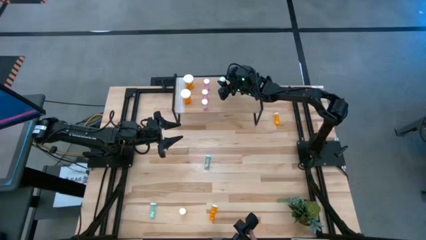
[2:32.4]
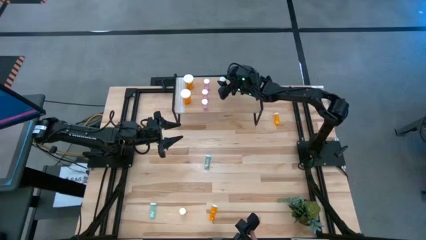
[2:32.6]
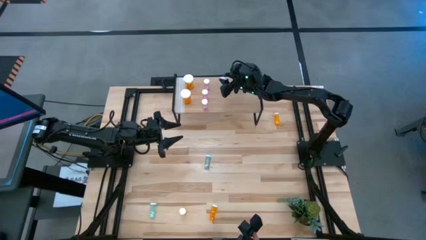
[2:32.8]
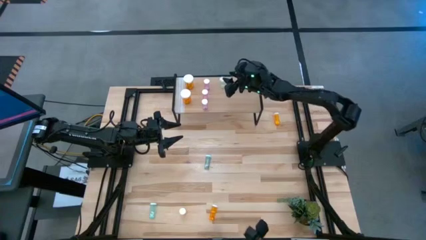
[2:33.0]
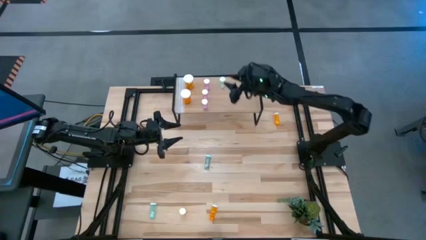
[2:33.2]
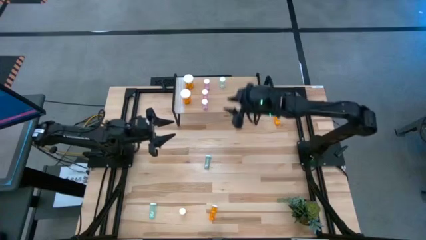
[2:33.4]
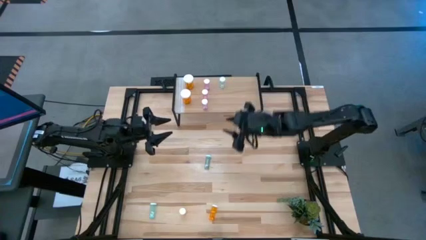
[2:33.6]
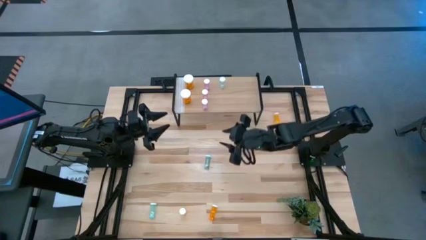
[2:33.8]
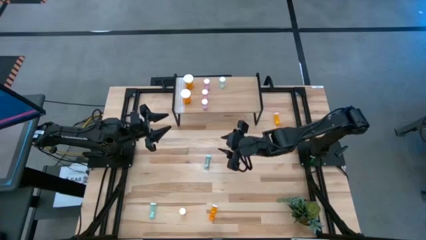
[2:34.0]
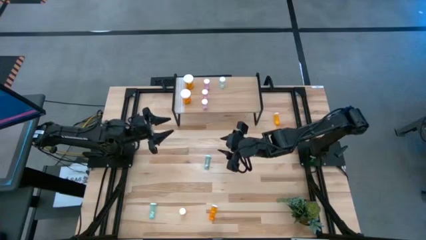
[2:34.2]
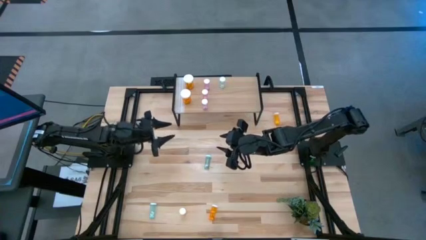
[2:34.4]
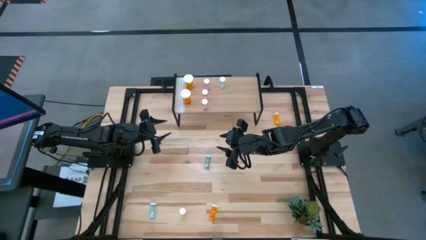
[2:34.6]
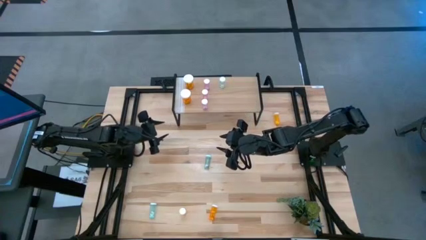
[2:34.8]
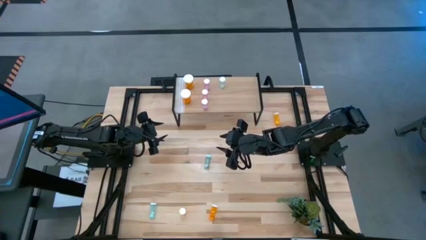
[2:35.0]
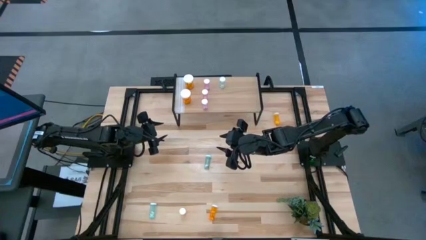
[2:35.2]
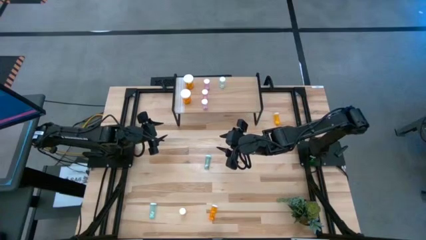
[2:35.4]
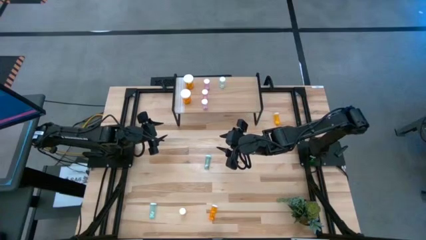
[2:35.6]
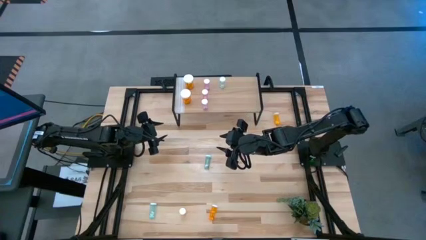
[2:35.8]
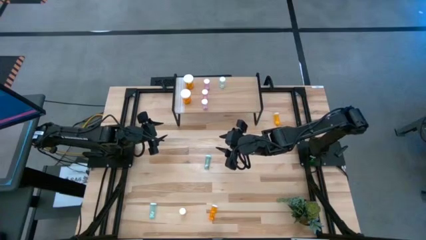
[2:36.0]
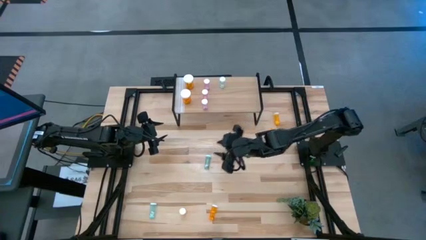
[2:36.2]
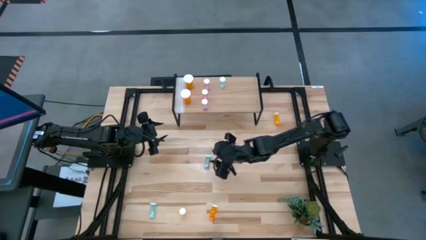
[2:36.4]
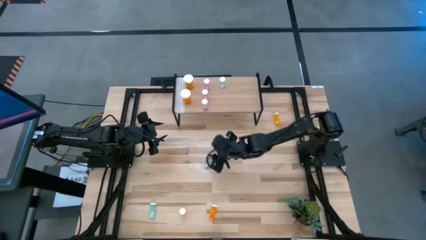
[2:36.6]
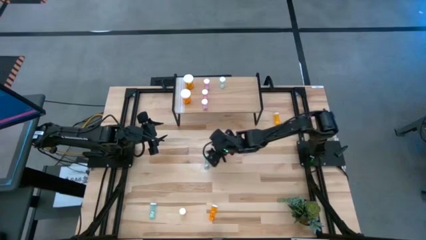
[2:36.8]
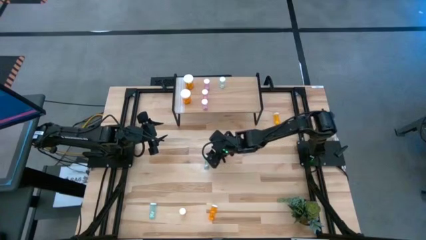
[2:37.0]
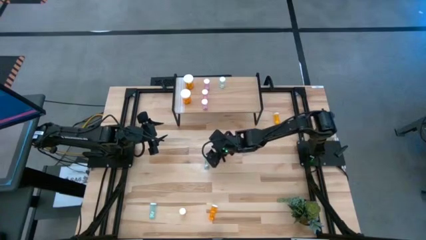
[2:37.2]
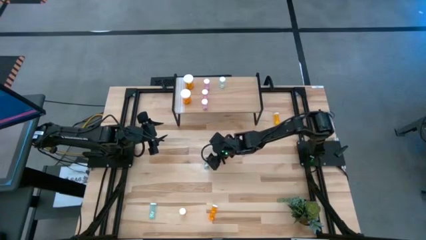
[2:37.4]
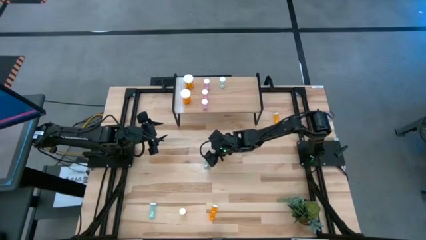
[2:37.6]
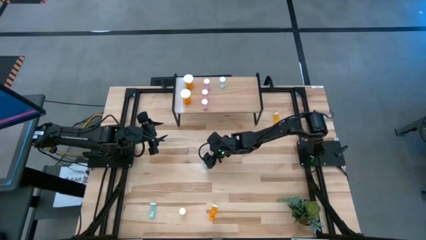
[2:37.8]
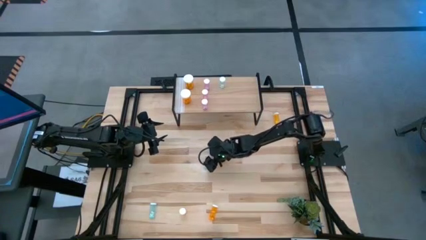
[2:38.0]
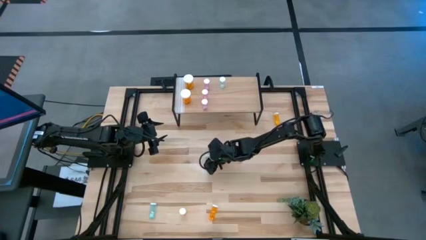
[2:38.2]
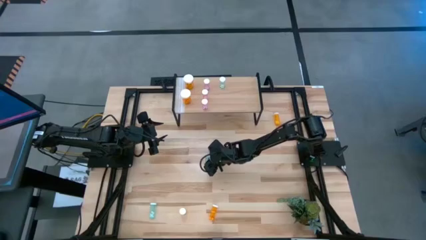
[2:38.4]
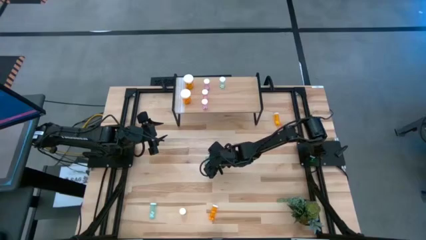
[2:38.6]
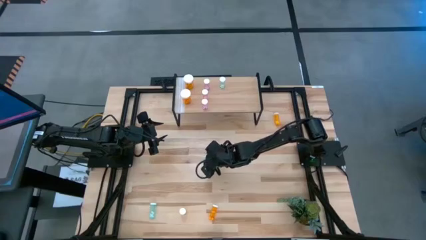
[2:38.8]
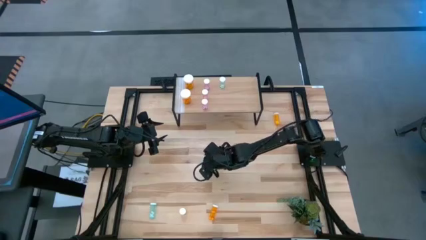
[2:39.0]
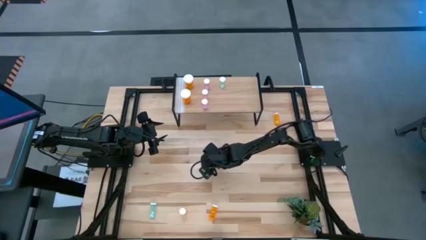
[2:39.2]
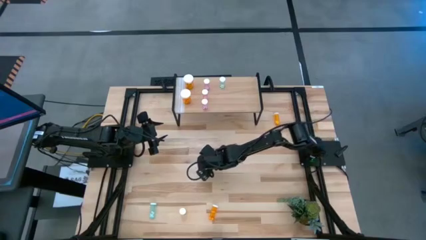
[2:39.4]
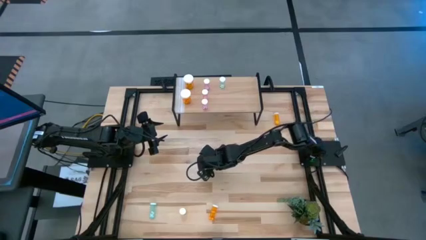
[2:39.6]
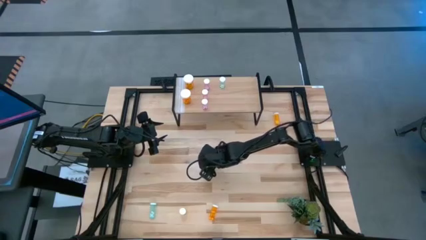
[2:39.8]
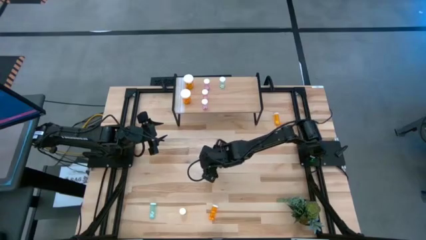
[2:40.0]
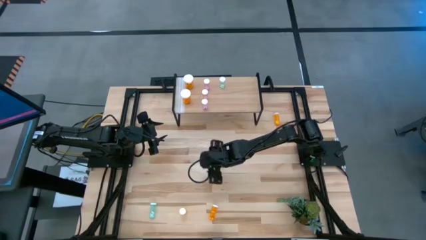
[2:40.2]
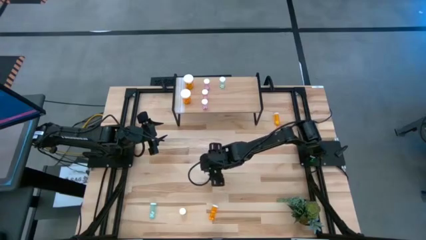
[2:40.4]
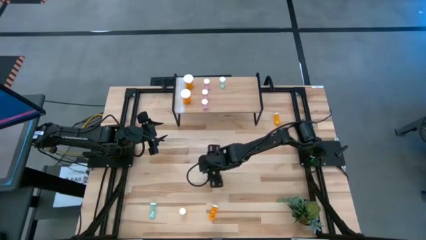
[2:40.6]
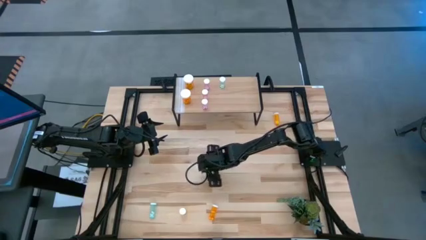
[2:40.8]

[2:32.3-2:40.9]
Task: Pick and place medicine bottles onto shelf by color
Put the top small blue pill bottle aligned with other small blue pill bottle on the shelf

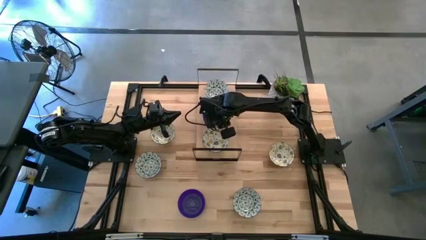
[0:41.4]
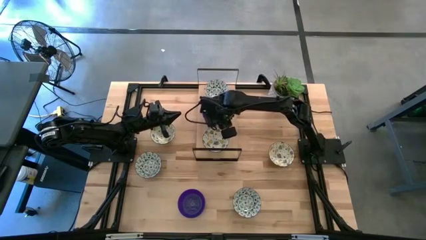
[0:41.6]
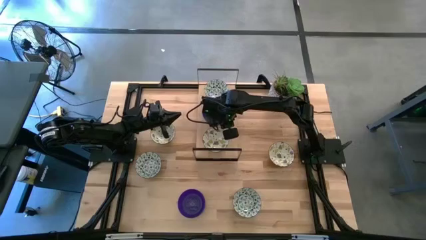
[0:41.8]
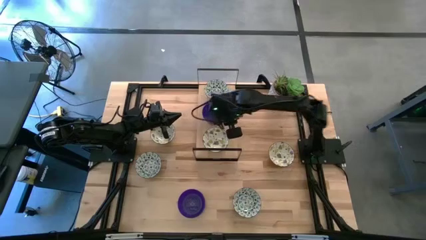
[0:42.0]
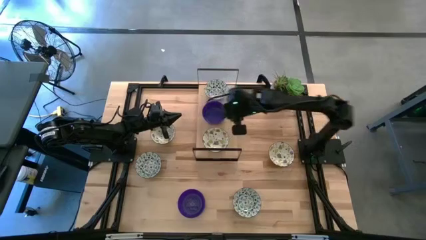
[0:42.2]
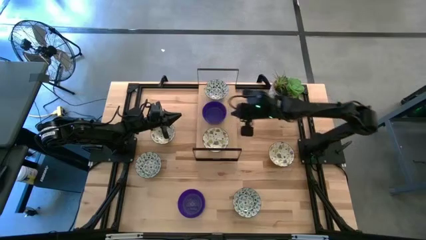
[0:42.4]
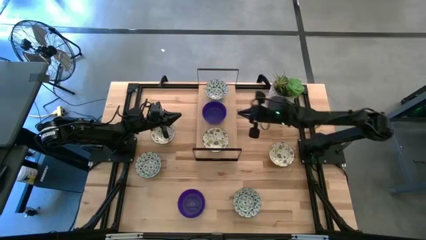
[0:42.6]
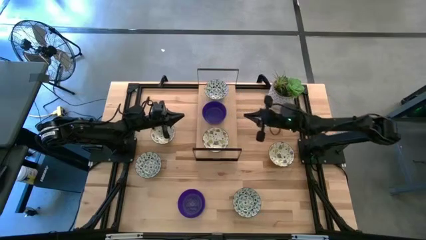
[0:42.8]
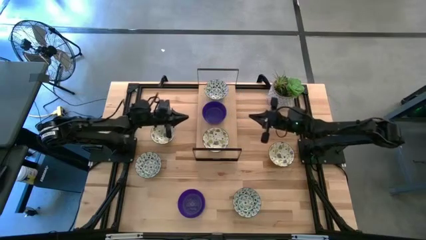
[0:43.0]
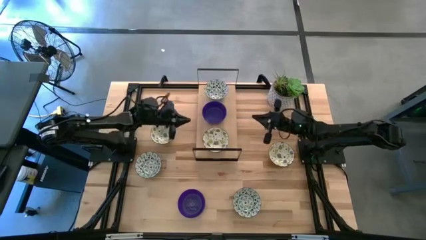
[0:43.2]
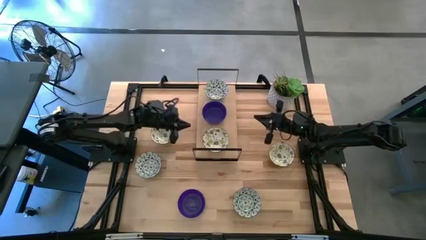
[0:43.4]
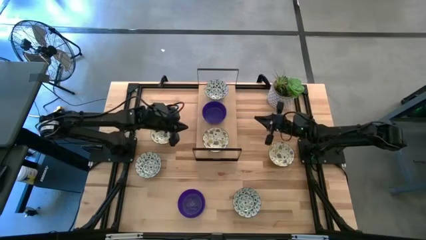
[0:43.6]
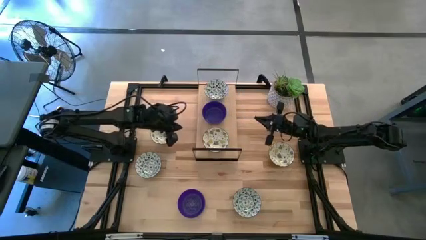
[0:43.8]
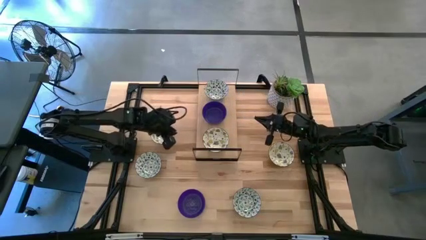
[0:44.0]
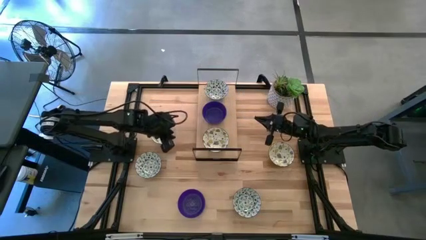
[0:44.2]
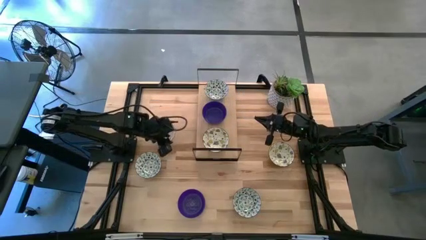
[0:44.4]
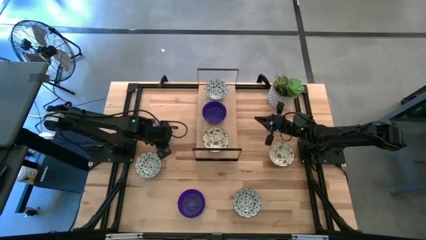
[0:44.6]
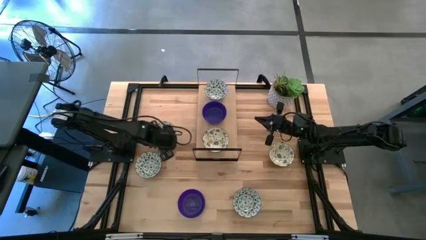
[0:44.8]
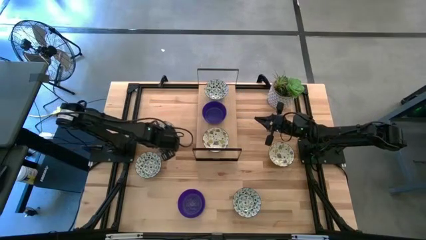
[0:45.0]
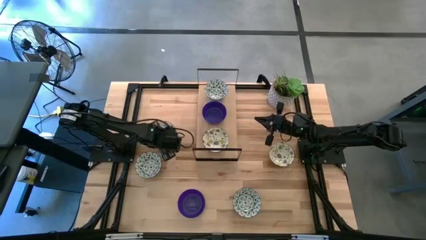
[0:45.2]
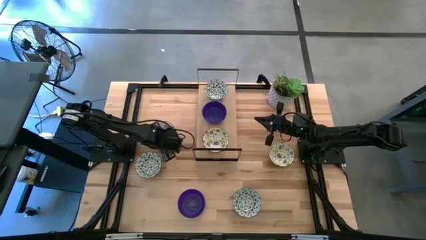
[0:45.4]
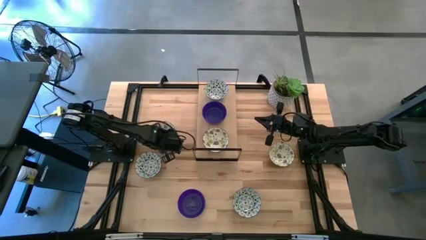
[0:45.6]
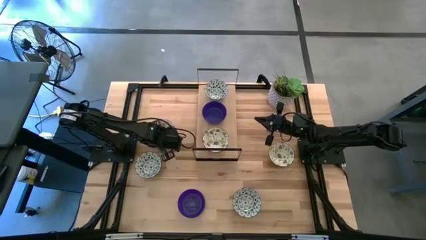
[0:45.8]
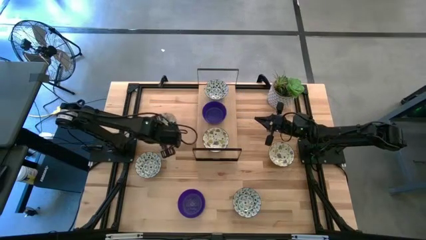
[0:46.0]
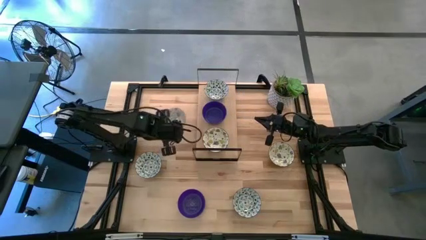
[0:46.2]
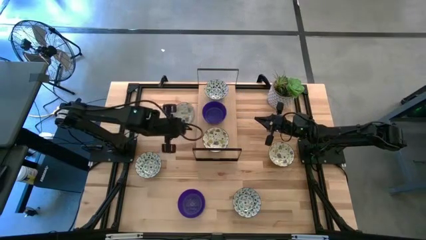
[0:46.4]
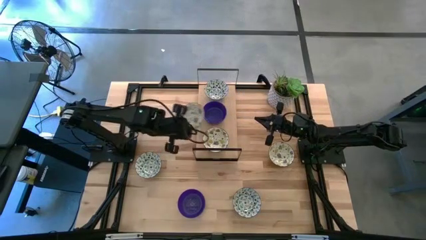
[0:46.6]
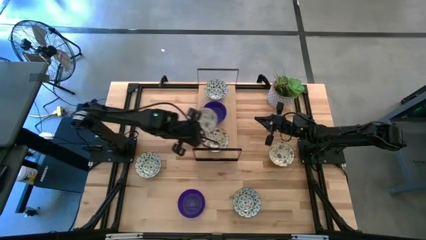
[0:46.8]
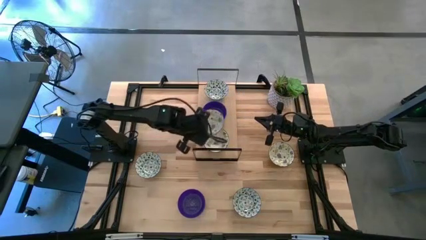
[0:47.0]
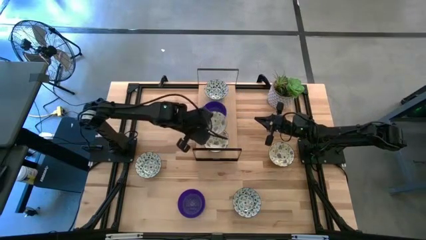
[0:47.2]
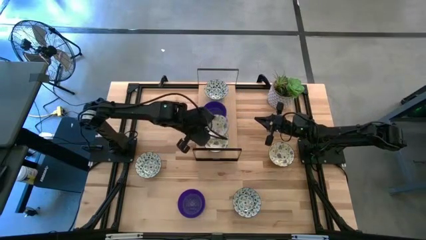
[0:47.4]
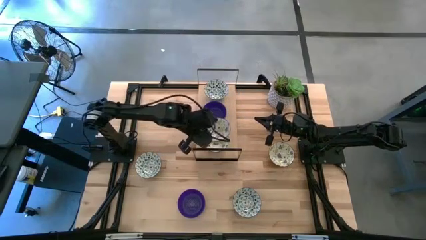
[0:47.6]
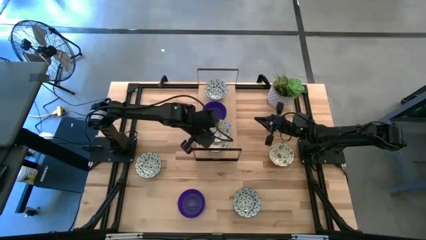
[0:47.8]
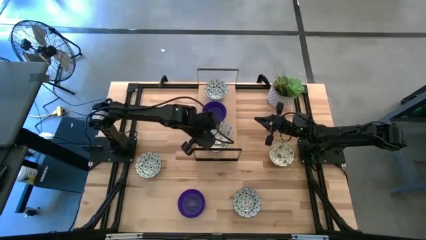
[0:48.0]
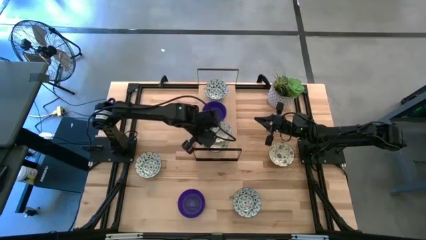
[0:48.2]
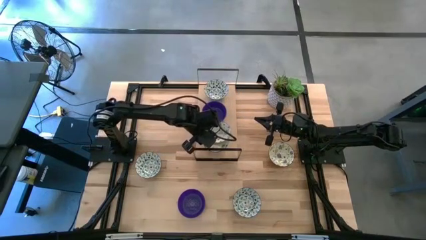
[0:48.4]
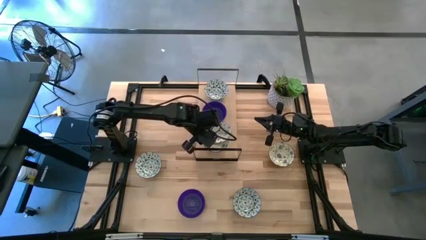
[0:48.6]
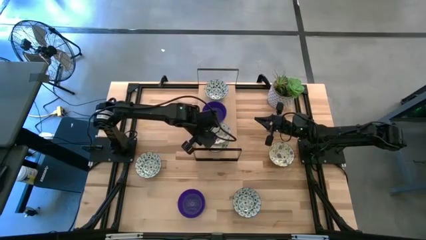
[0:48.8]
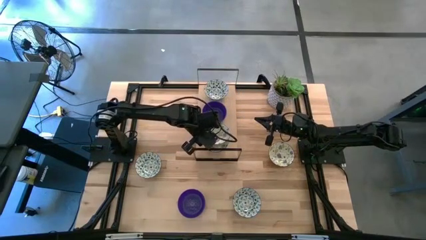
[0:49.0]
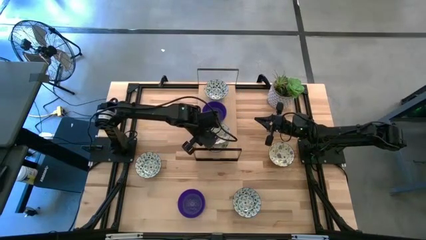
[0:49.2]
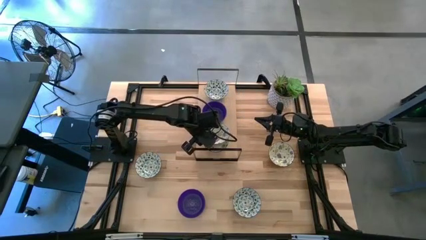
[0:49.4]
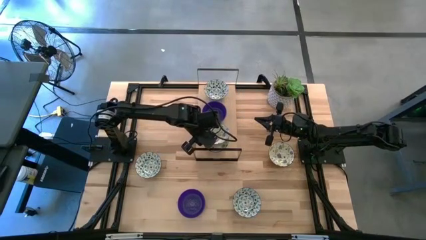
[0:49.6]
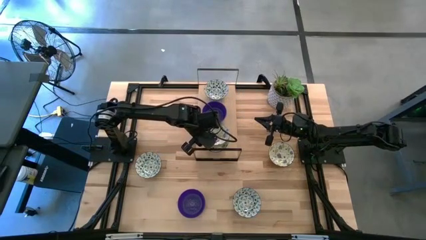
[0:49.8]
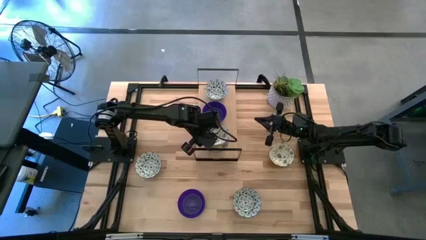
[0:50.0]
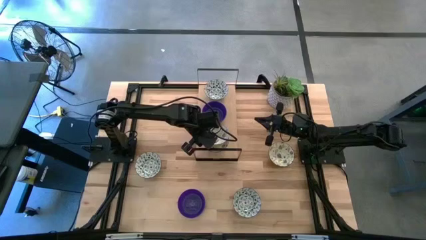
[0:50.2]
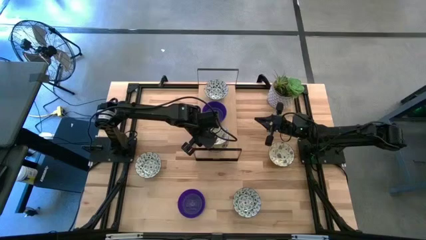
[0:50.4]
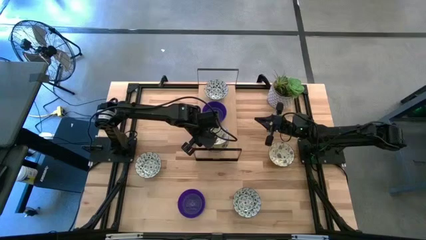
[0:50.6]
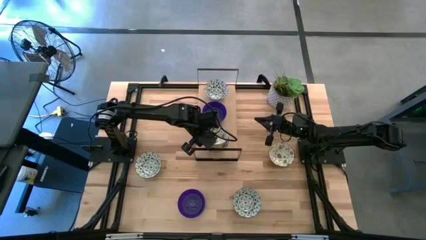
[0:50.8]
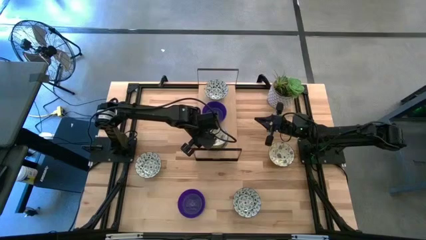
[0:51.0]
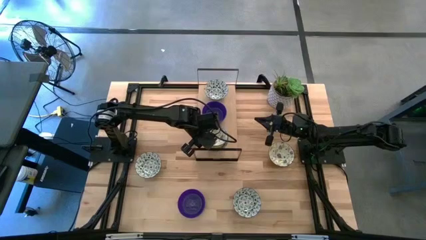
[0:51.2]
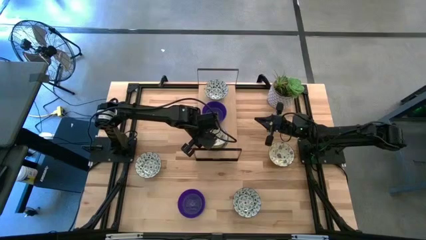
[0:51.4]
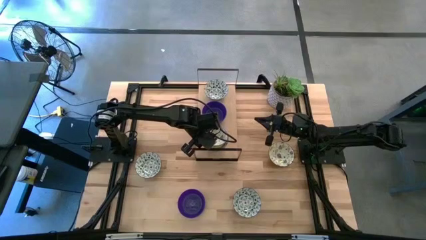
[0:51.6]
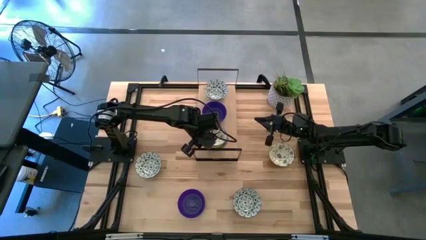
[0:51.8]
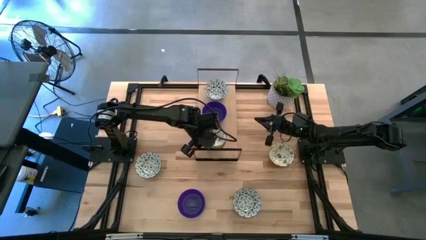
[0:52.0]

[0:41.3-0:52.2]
Task: Pick & Place Mini bowls
Stack the left yellow patterned bowl on top of the yellow patterned bowl on the shelf
